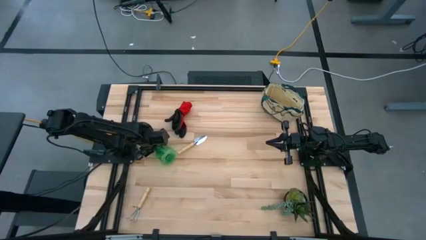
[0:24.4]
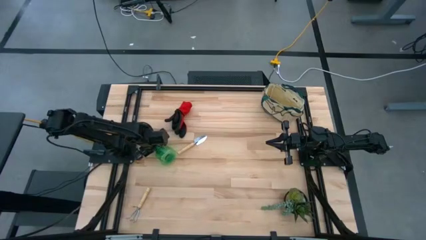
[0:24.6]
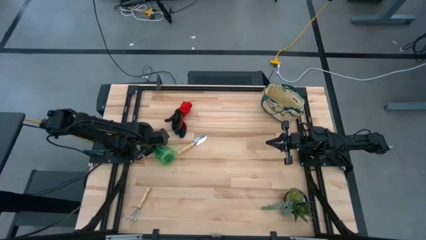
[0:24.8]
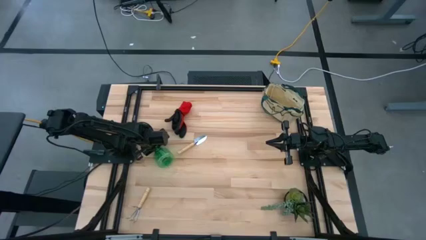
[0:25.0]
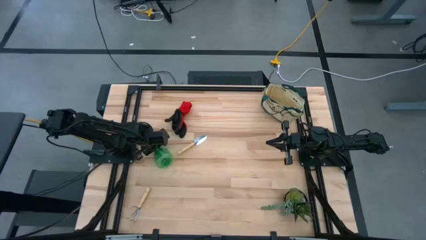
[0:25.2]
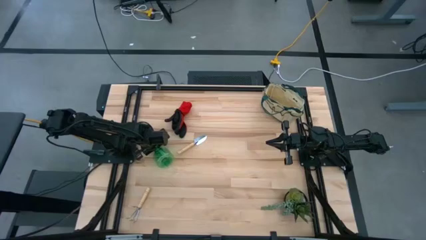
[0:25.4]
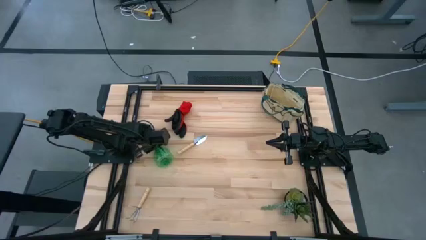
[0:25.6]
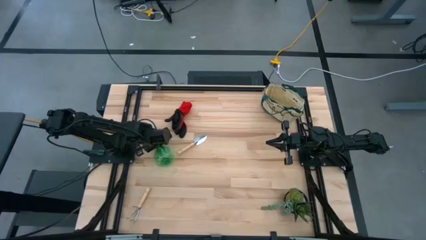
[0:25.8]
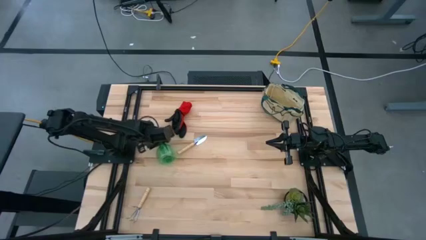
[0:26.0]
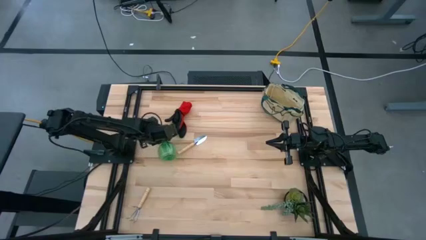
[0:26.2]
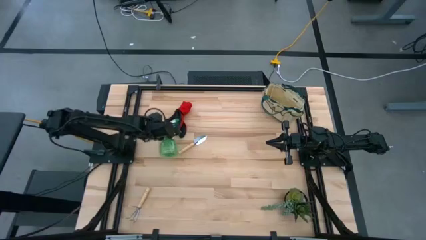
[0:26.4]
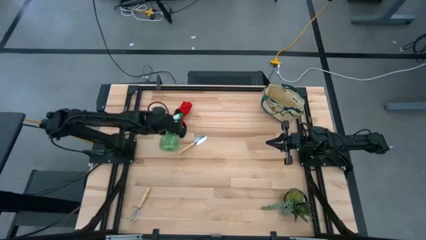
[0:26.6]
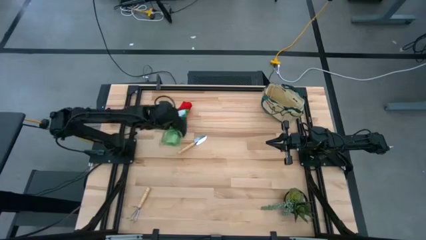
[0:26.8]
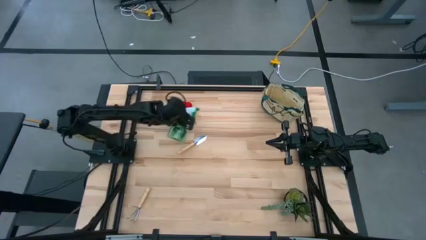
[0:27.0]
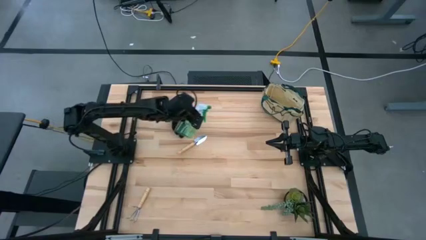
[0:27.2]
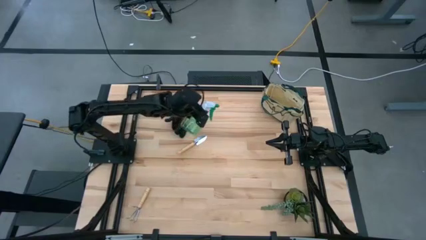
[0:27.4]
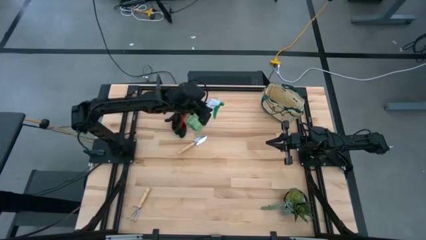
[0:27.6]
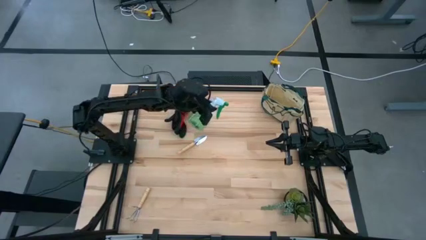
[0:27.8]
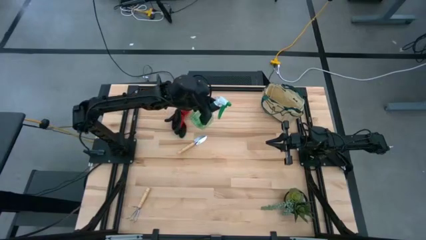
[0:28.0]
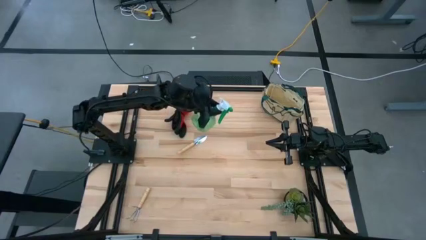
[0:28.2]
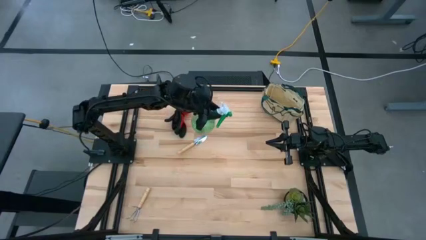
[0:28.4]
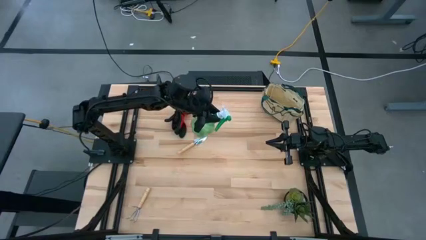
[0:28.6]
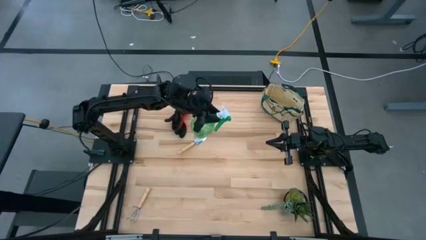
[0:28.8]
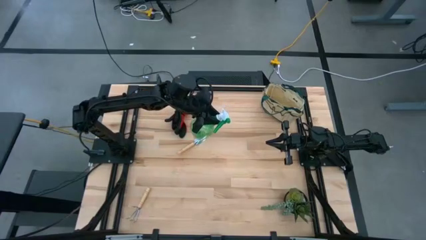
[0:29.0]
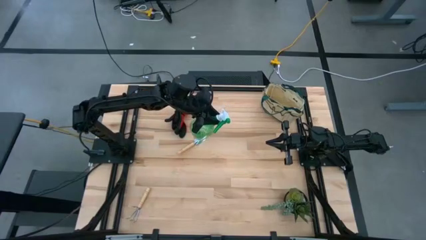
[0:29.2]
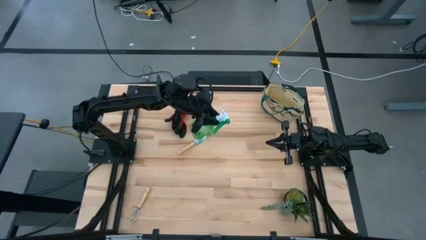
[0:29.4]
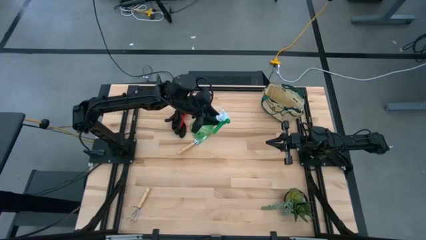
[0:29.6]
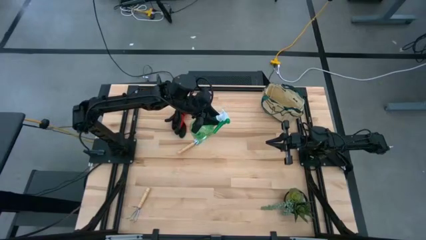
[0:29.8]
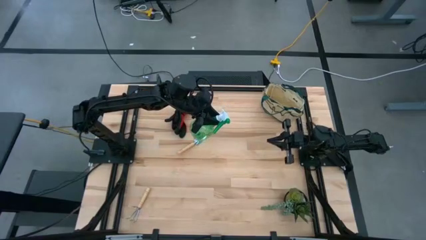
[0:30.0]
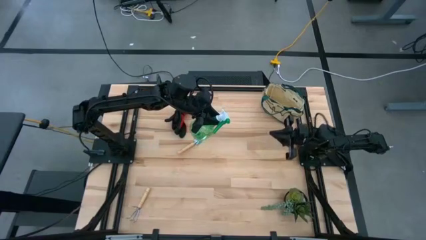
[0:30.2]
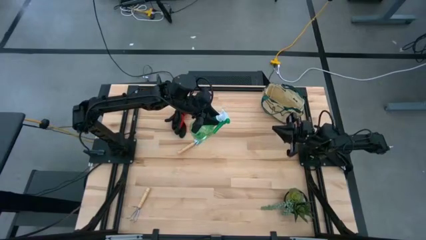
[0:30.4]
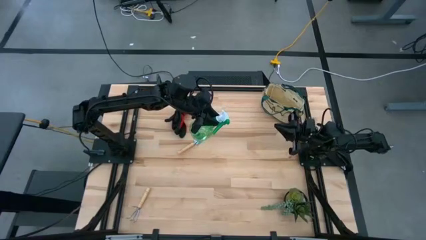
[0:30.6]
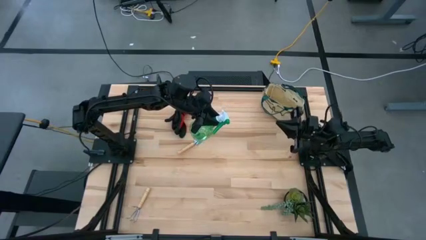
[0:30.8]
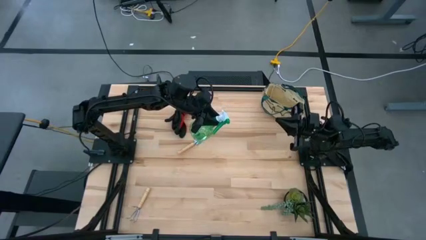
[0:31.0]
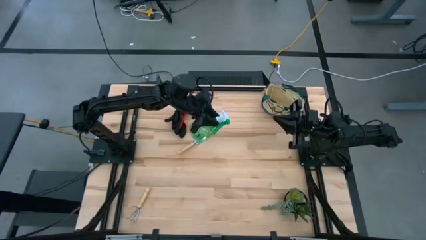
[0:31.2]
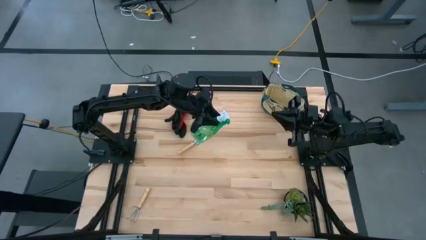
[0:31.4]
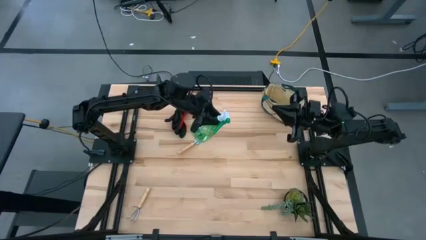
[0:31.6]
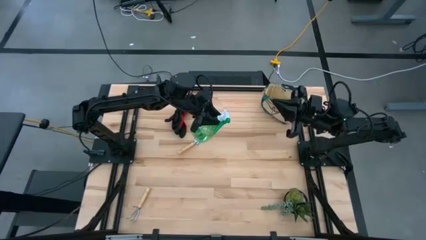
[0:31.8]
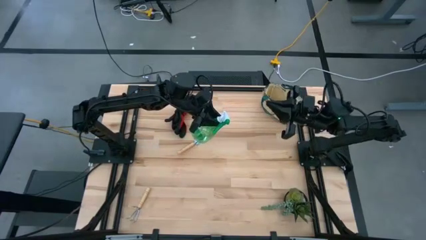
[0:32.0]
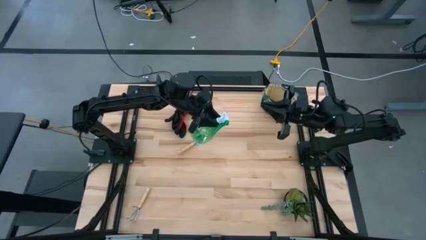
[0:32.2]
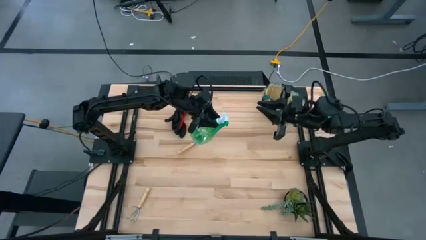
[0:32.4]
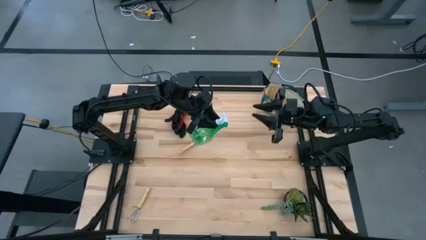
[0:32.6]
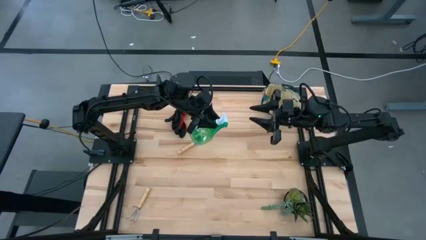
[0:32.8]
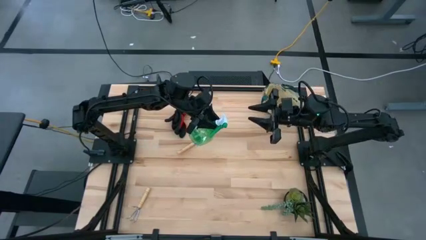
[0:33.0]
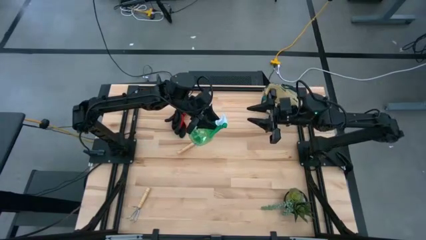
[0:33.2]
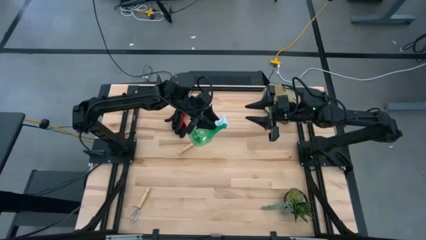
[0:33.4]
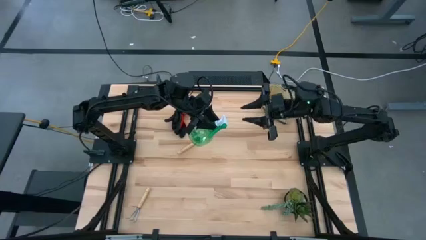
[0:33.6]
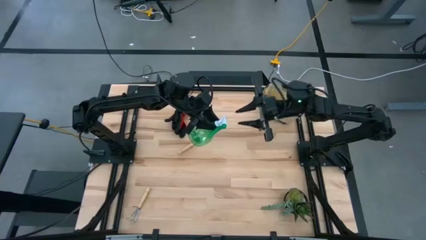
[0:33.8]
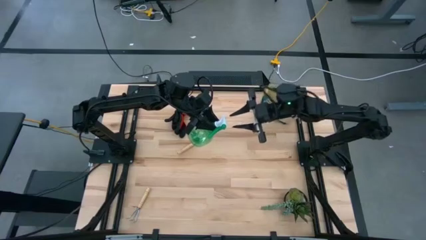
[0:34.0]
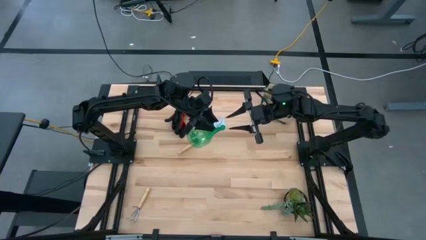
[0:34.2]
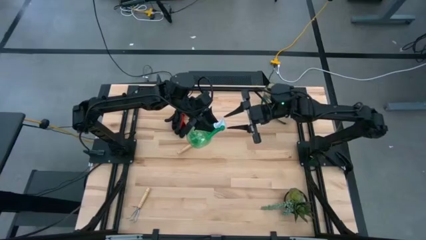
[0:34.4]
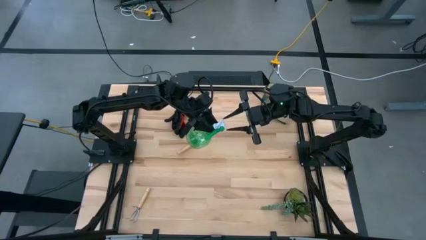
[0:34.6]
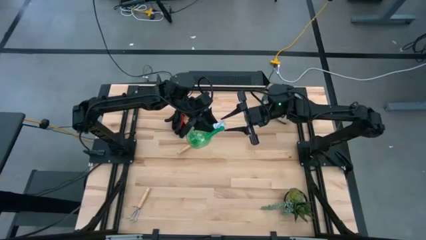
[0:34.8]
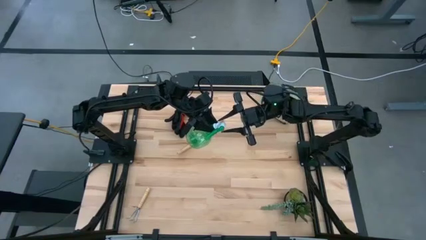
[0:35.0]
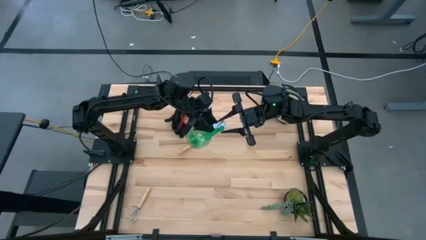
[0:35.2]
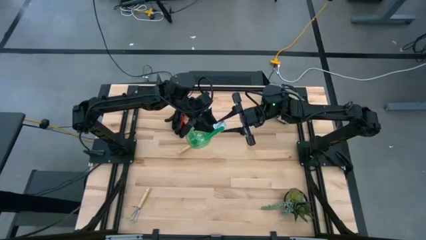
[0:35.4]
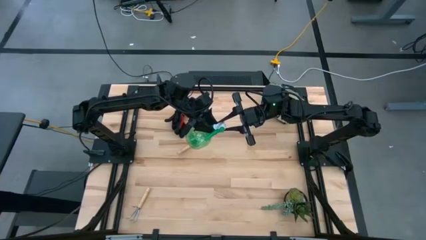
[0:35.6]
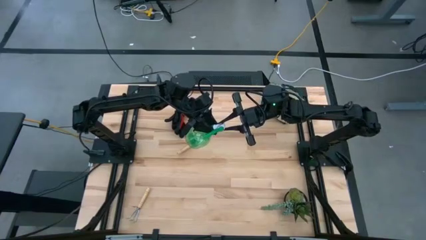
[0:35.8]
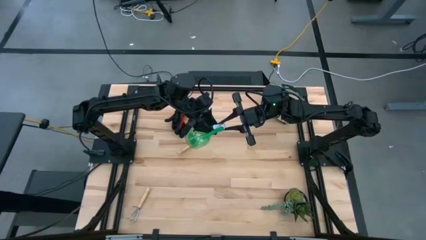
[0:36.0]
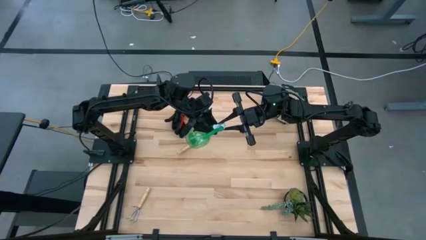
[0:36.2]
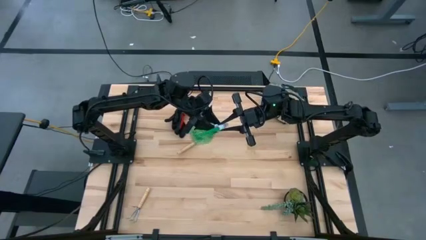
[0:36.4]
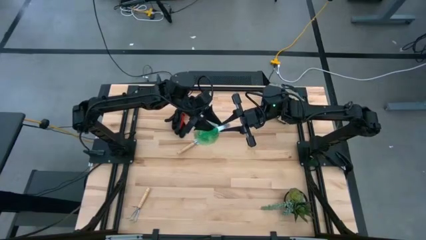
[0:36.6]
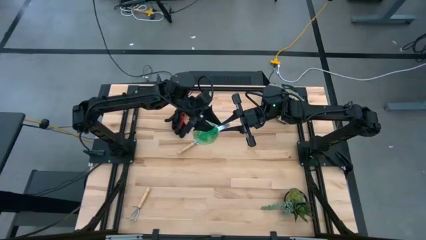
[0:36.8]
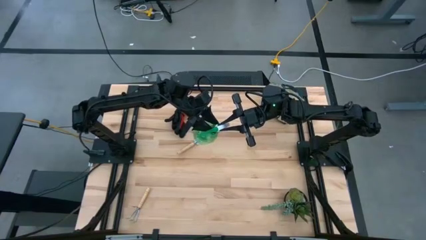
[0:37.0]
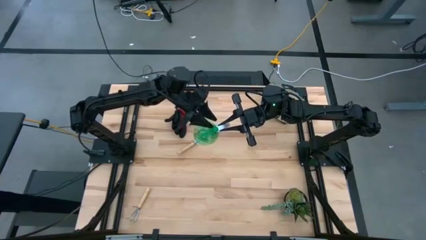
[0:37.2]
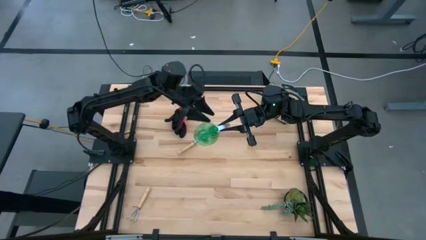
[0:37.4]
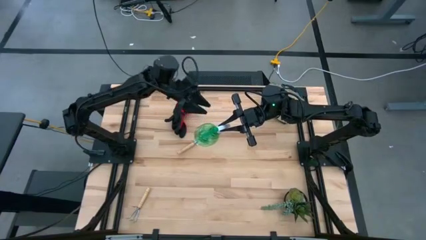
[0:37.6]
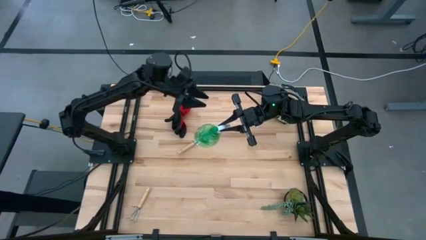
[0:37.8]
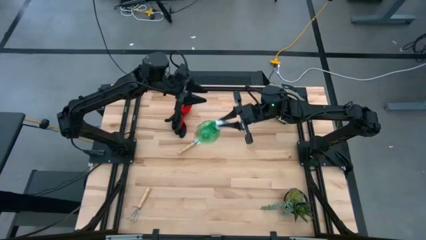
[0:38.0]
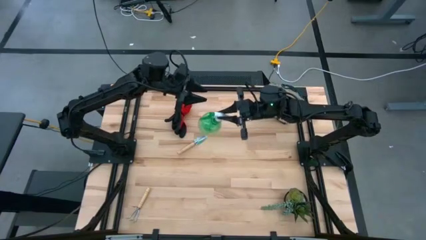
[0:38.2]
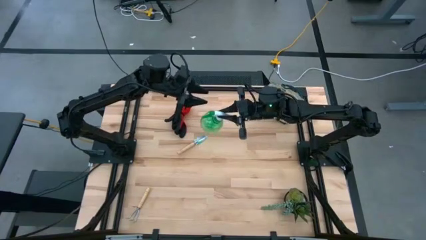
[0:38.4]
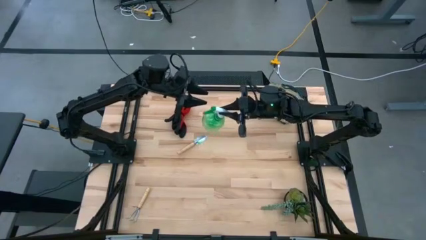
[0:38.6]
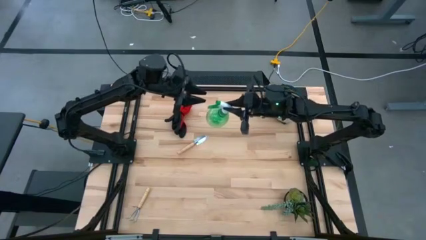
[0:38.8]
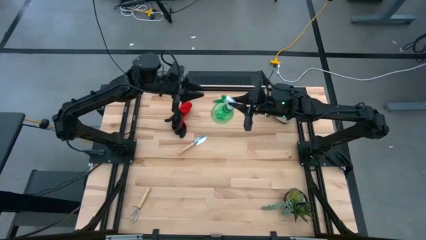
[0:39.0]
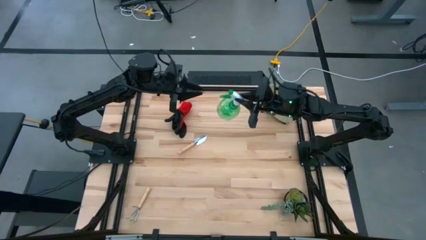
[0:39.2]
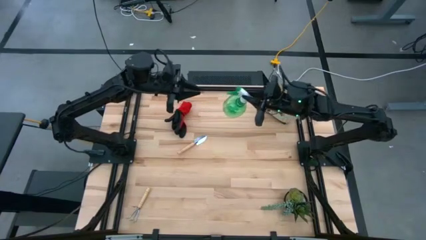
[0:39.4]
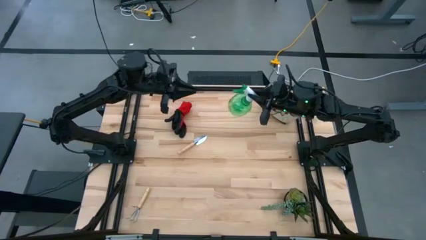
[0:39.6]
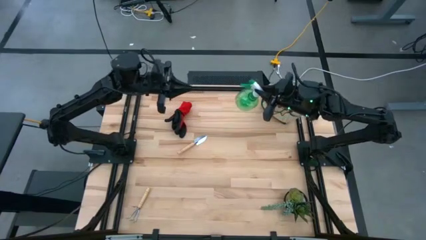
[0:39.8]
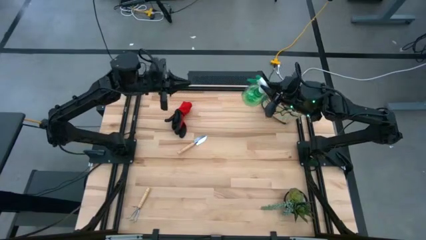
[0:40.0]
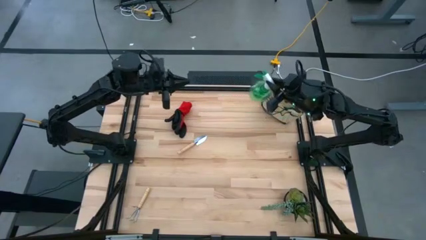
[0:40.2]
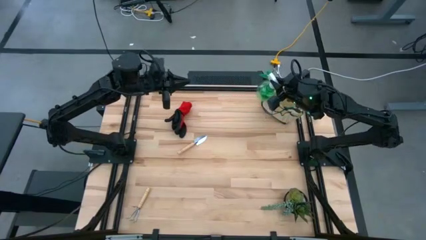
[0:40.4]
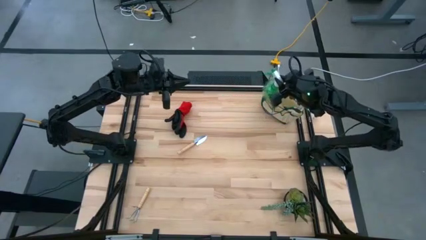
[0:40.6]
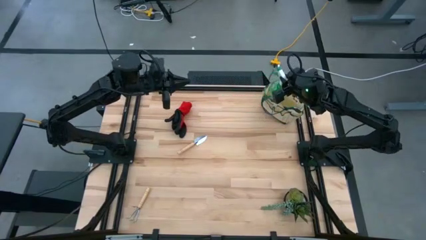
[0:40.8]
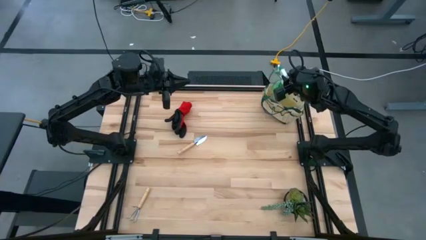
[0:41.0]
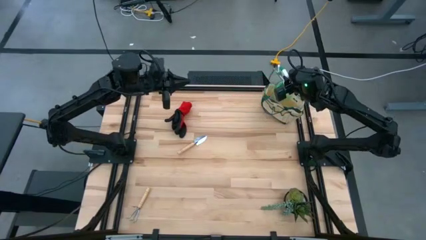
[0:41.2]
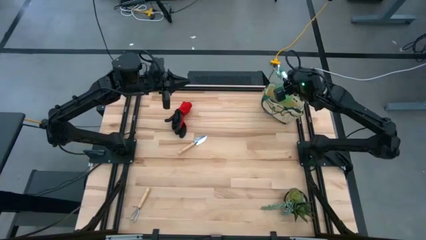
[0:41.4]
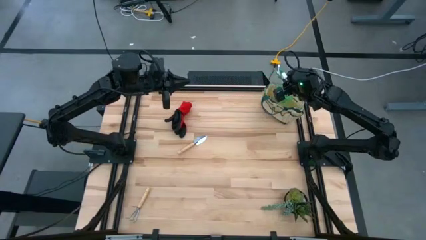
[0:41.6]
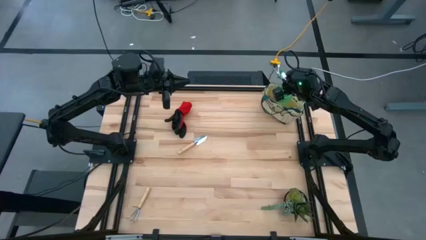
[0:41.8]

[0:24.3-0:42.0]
Task: Pick & Place Garden tools in Gardening bag
Put the green spray bottle into the gardening bag
